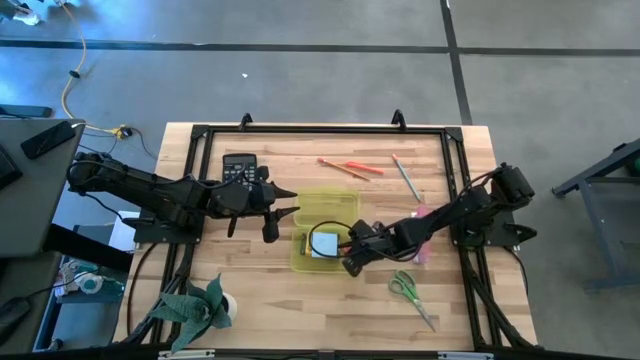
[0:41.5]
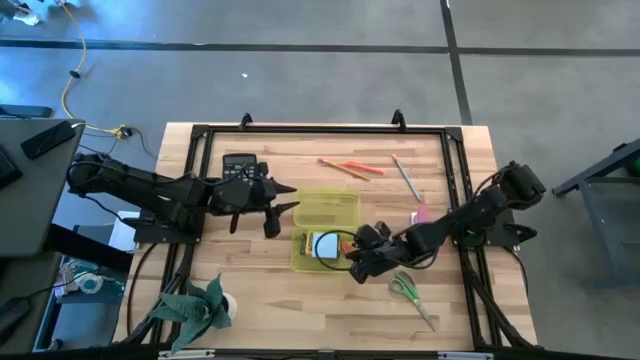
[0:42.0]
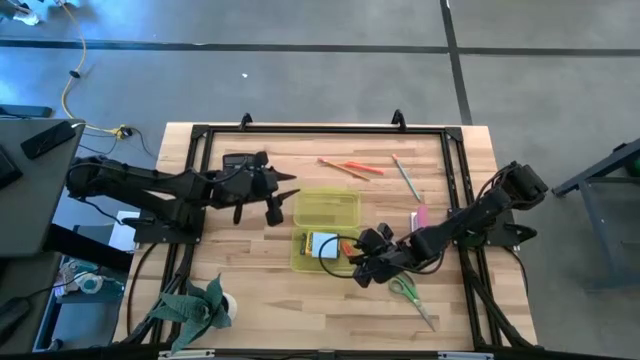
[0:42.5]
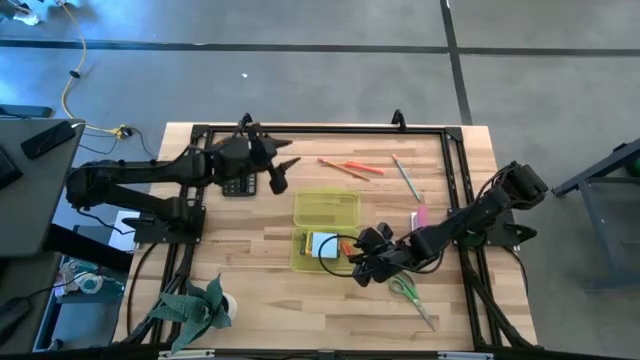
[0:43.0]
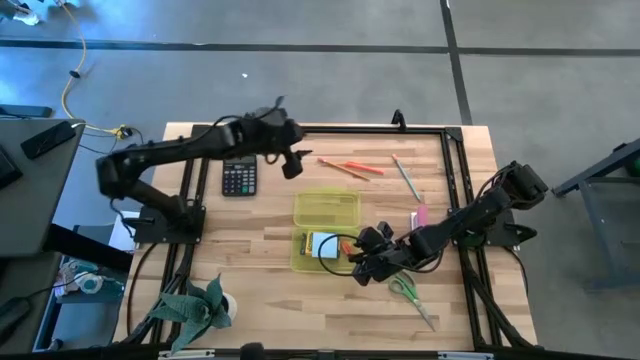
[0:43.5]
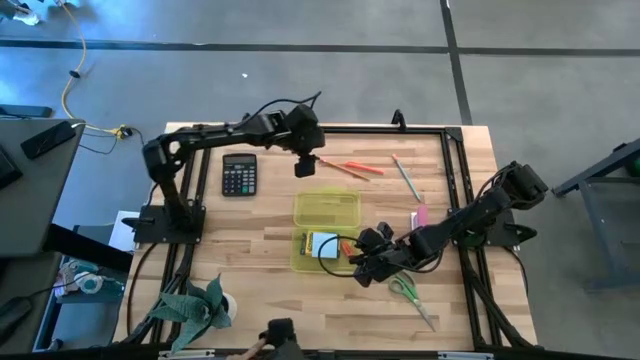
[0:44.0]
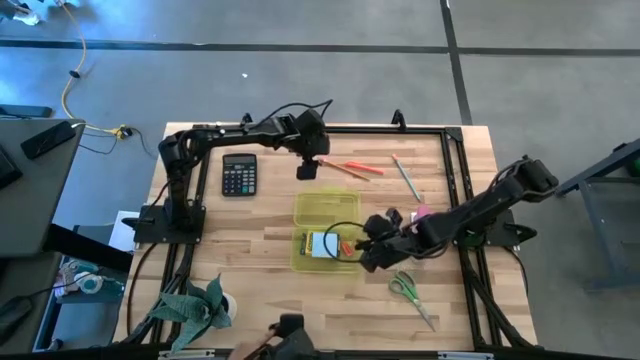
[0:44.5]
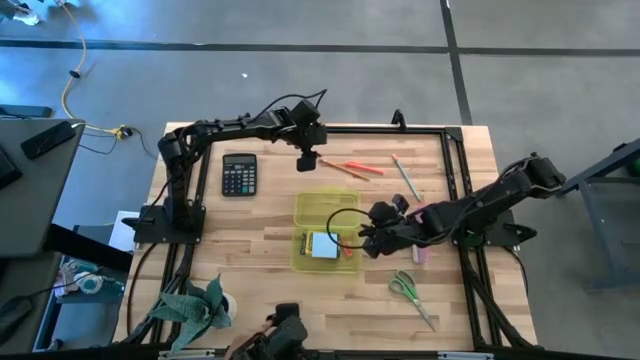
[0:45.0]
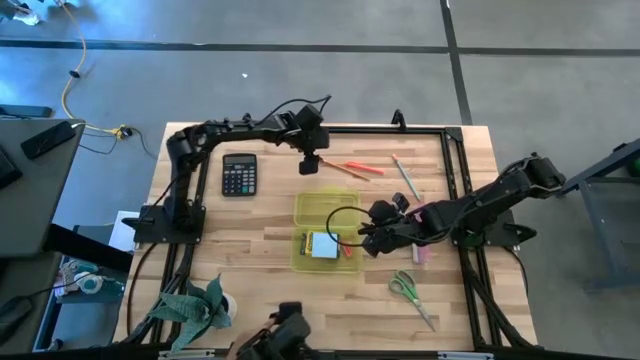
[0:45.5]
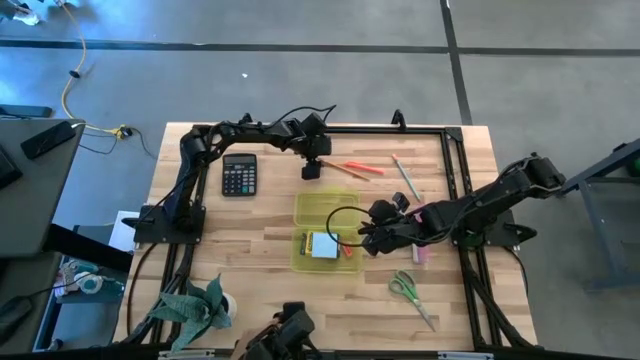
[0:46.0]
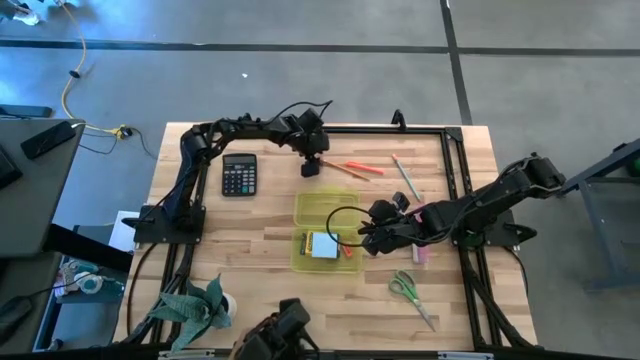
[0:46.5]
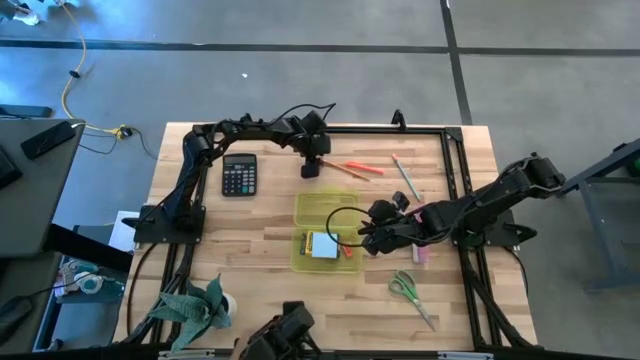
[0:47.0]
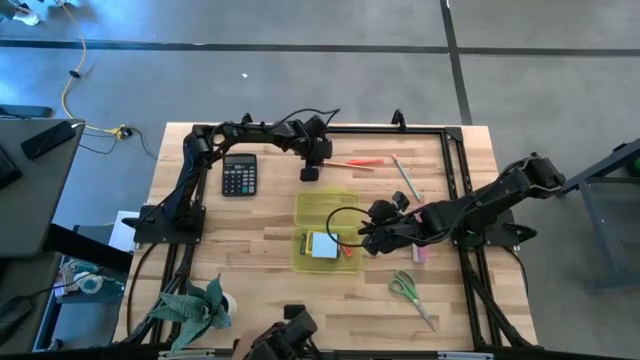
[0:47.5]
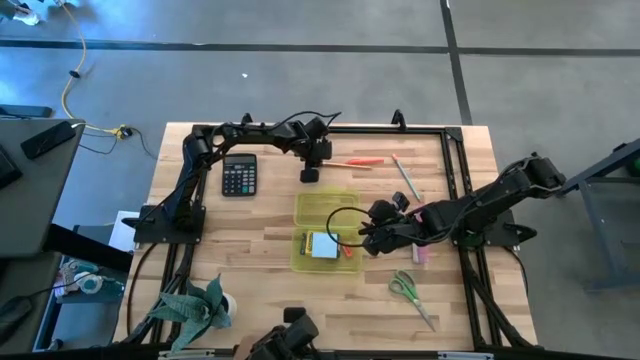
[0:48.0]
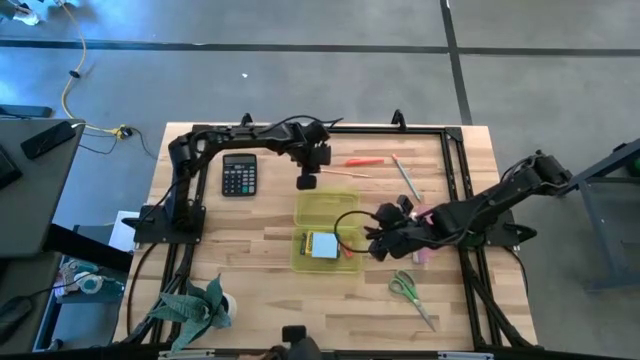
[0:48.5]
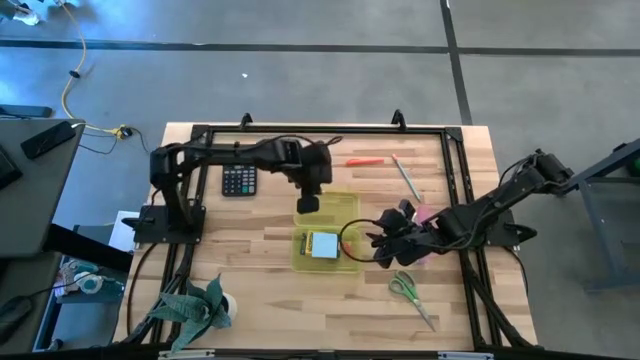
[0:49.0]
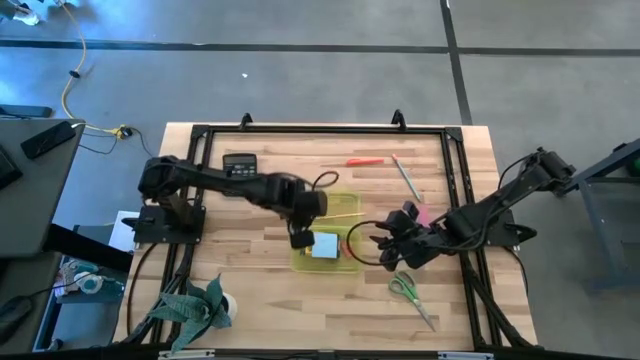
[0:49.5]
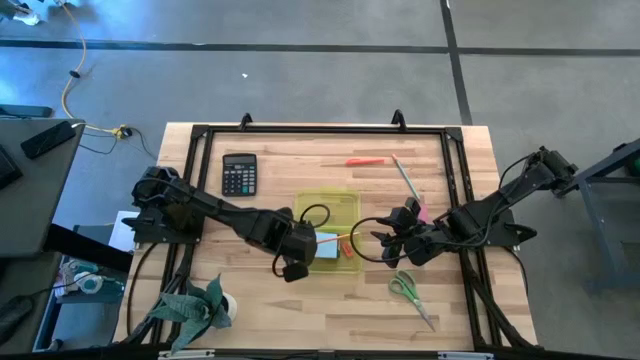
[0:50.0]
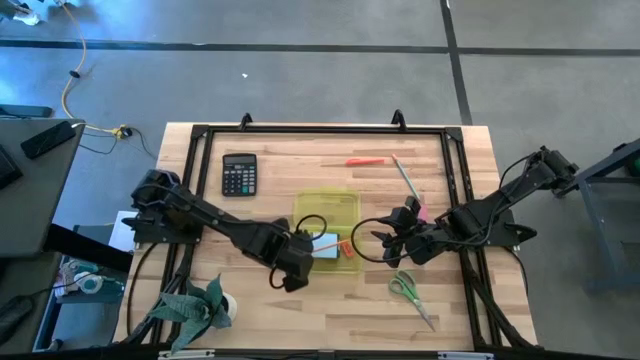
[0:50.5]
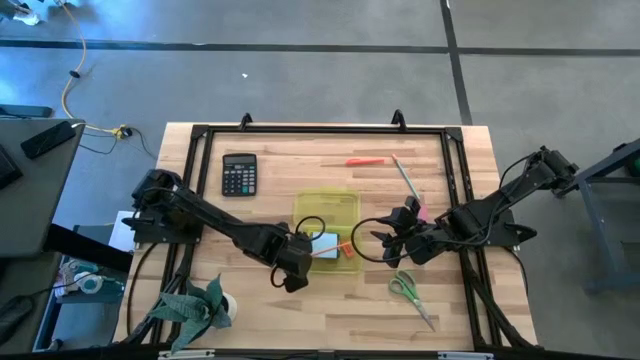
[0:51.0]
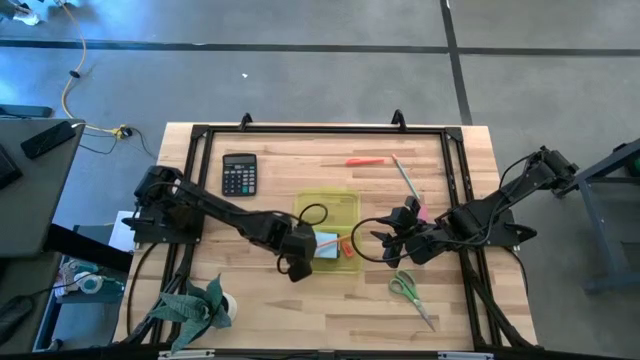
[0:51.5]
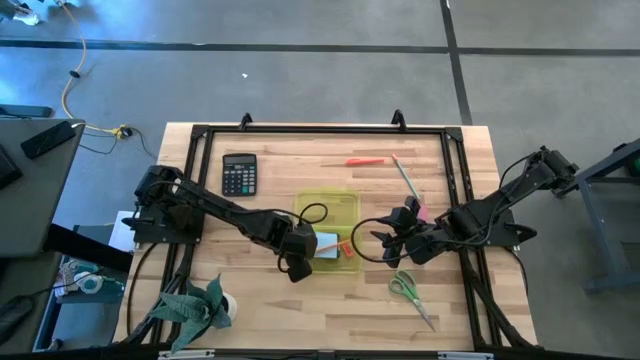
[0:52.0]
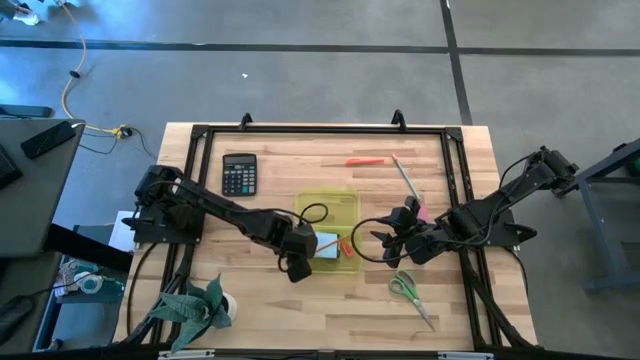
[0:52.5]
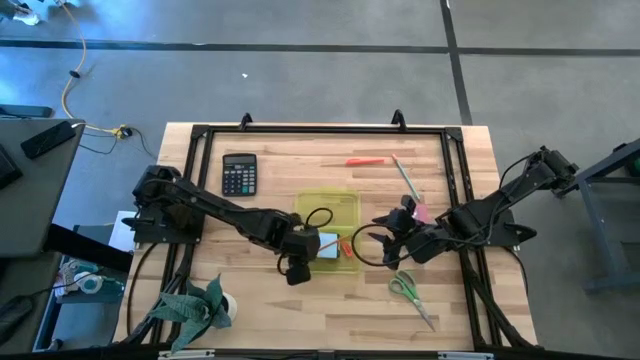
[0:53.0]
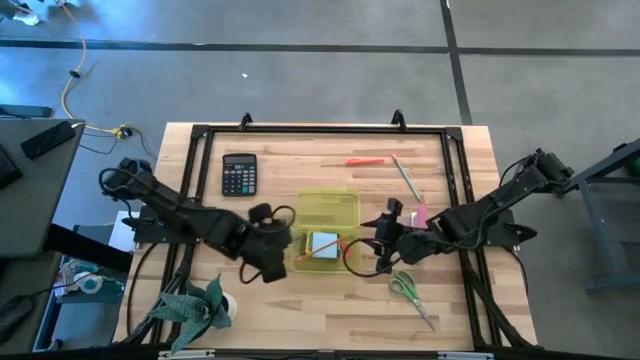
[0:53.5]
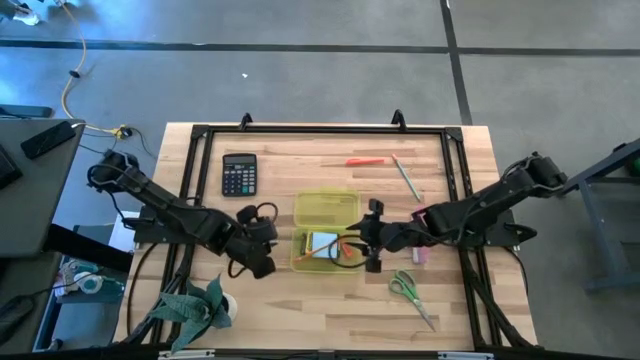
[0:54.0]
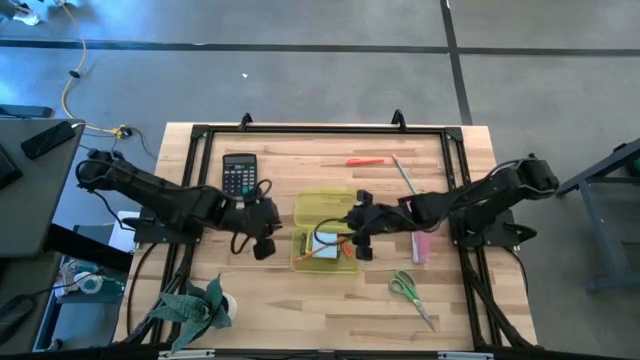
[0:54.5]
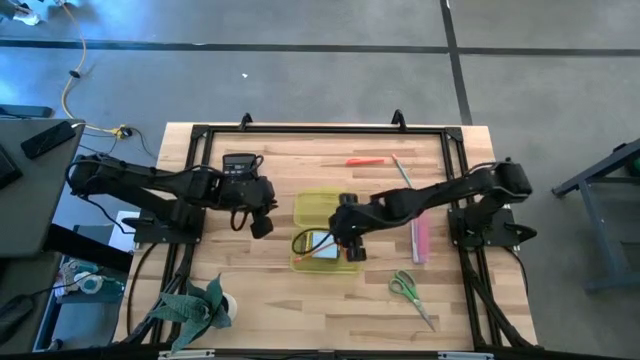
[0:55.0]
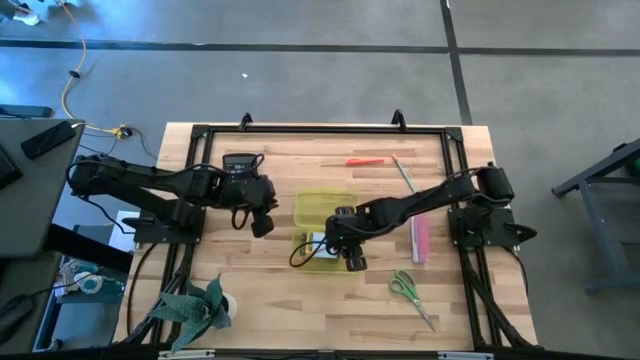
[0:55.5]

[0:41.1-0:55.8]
Task: Pack school essentials
Put the orange pencil into the yellow supply box

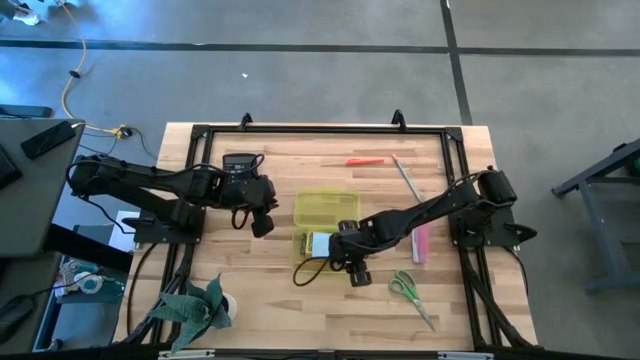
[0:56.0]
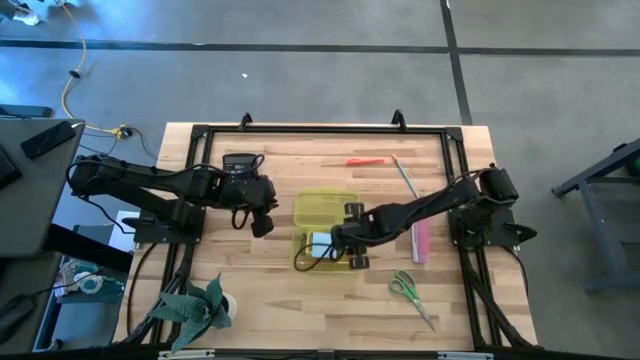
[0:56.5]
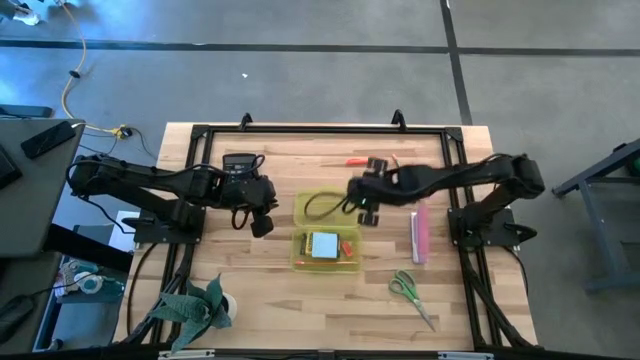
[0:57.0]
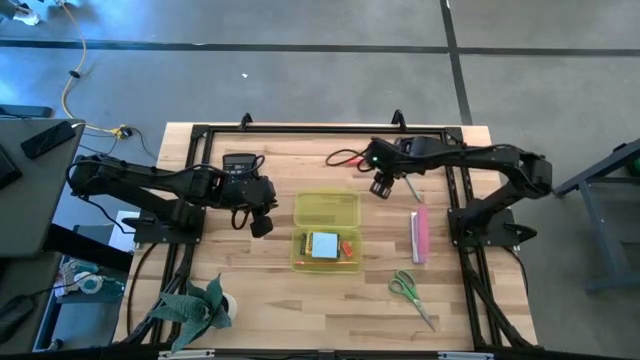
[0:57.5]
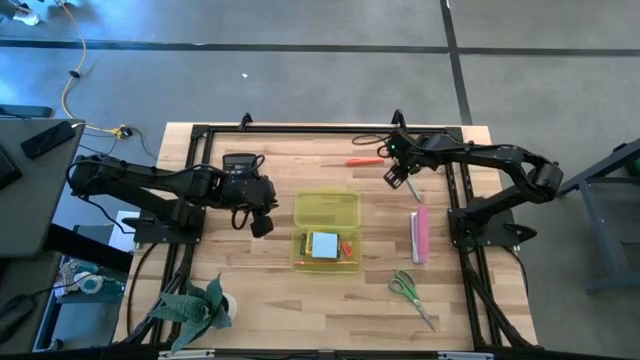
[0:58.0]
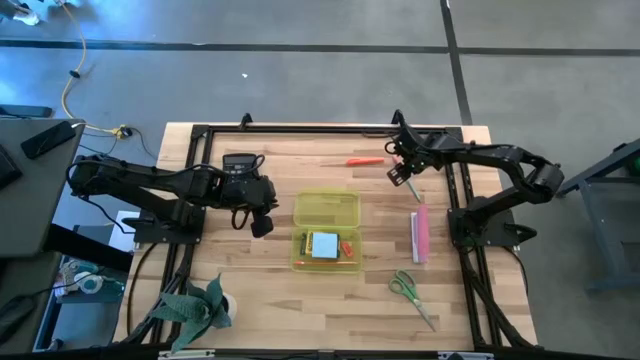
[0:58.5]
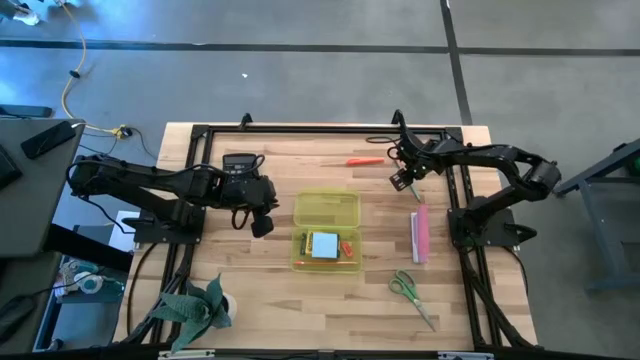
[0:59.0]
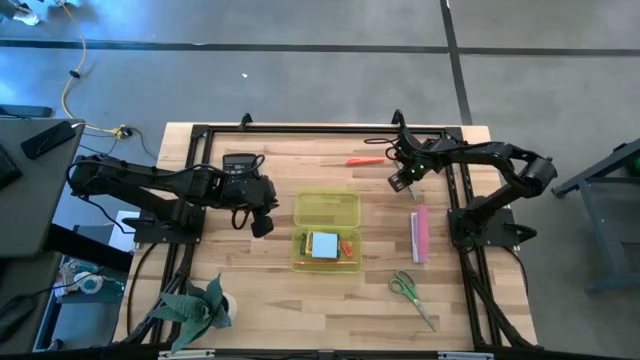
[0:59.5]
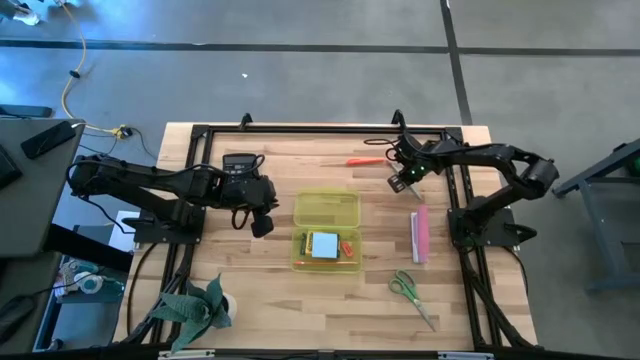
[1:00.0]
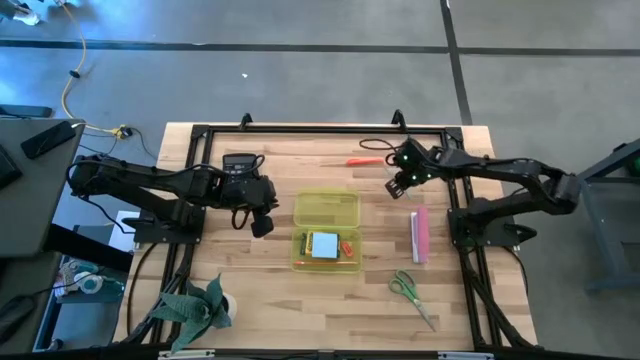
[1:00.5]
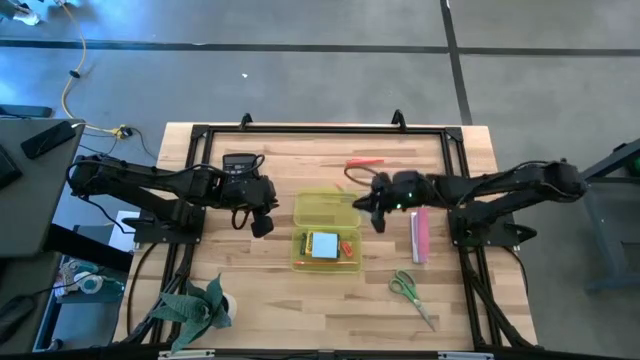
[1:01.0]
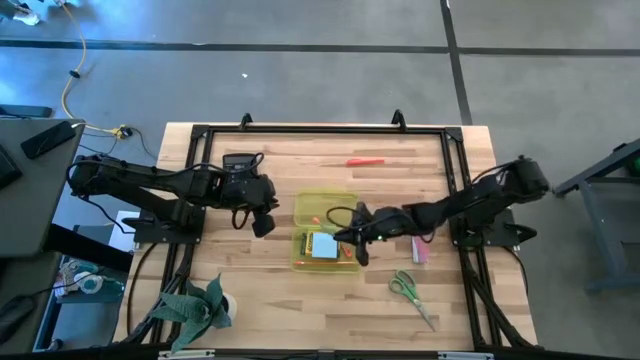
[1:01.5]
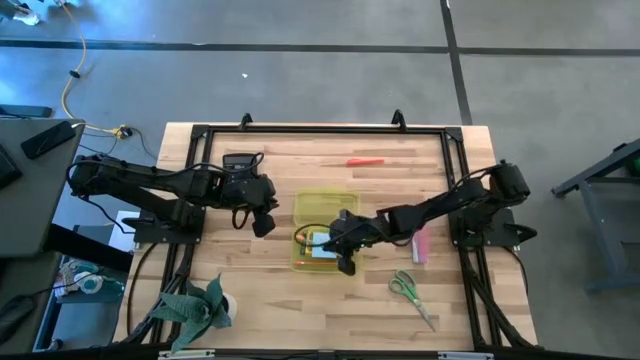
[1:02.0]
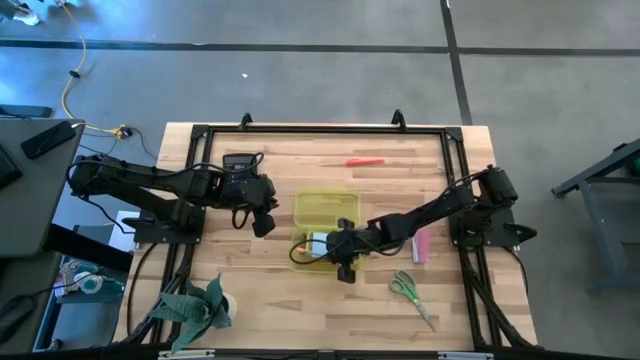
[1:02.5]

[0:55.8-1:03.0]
Put the blue pencil into the yellow supply box
